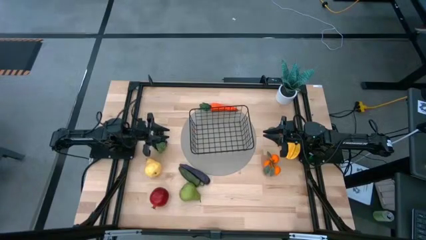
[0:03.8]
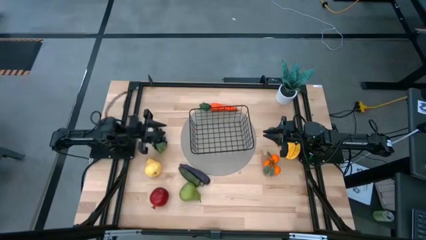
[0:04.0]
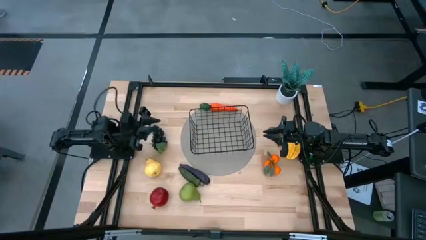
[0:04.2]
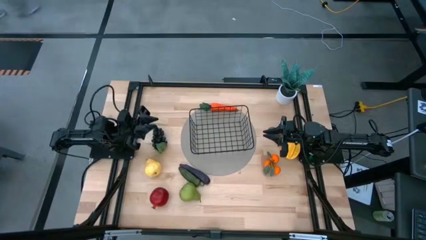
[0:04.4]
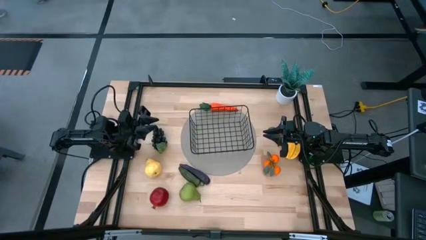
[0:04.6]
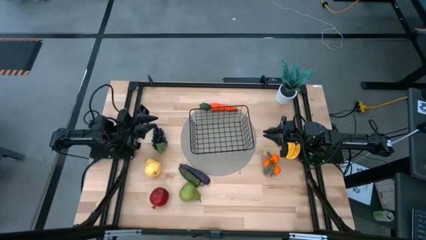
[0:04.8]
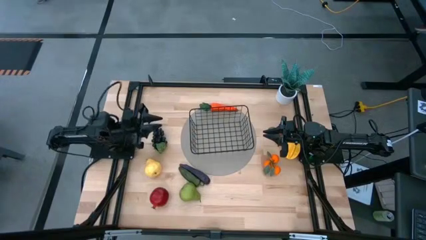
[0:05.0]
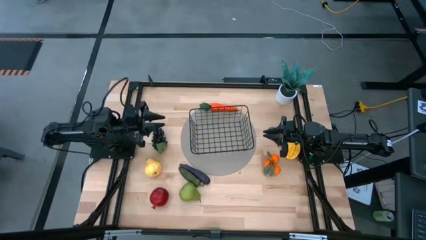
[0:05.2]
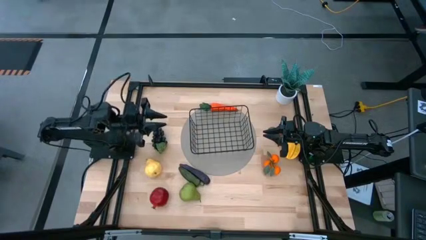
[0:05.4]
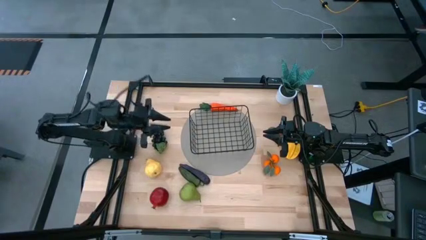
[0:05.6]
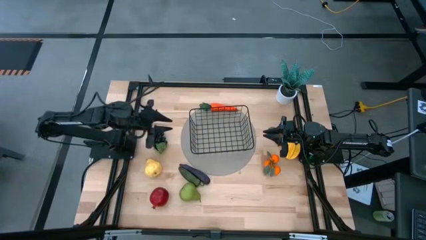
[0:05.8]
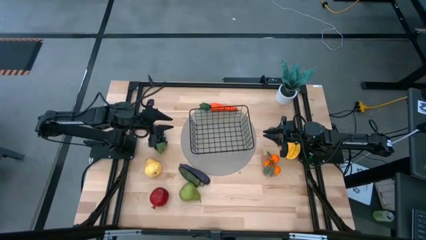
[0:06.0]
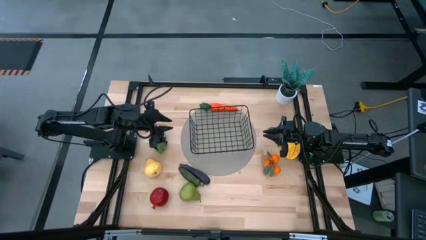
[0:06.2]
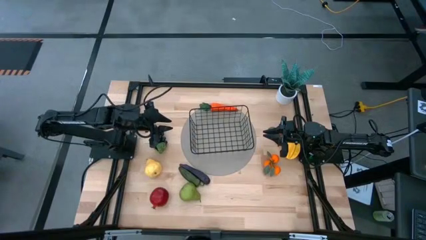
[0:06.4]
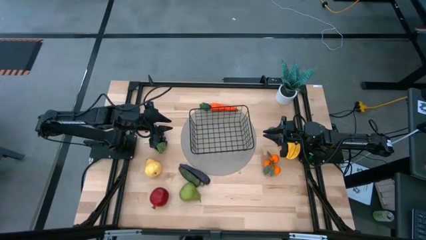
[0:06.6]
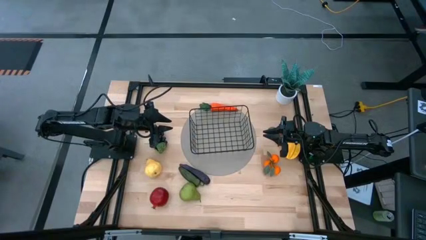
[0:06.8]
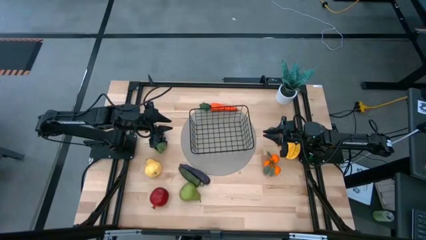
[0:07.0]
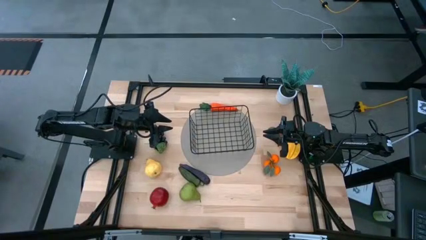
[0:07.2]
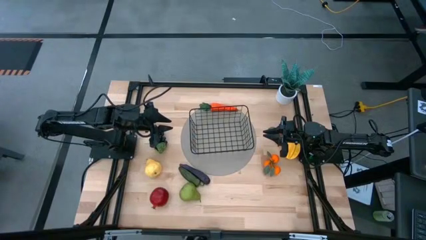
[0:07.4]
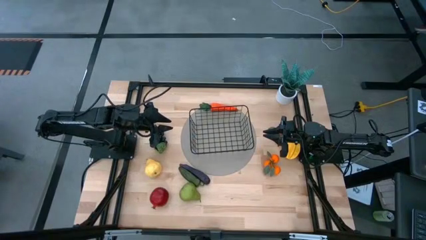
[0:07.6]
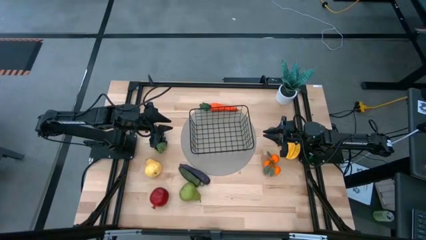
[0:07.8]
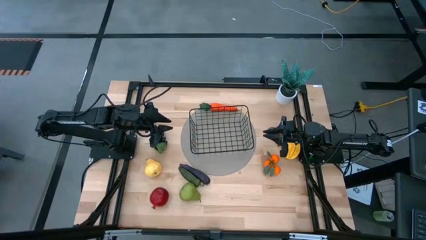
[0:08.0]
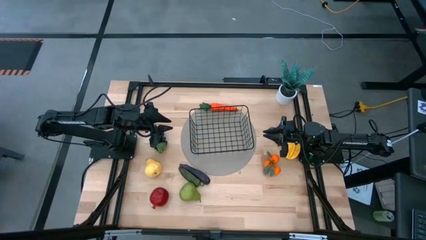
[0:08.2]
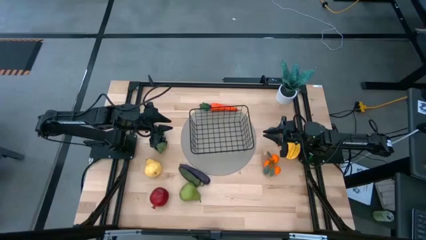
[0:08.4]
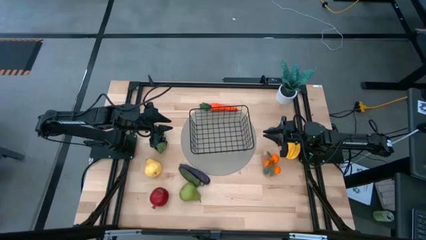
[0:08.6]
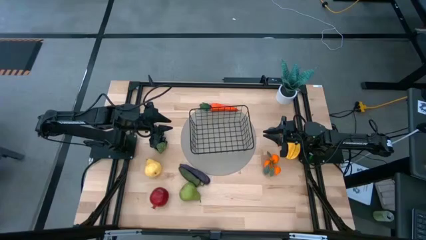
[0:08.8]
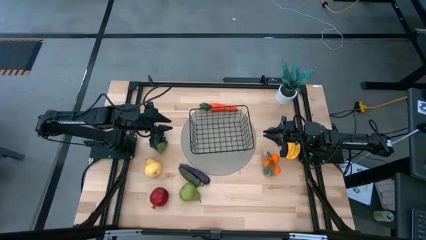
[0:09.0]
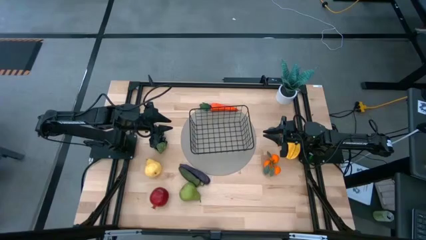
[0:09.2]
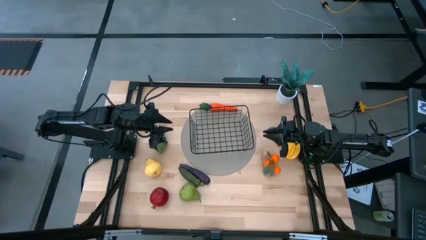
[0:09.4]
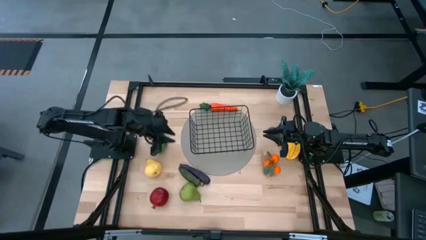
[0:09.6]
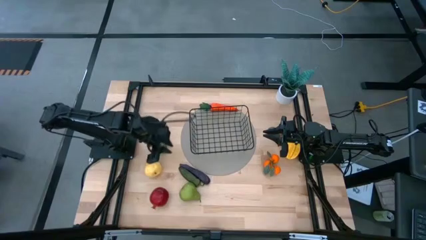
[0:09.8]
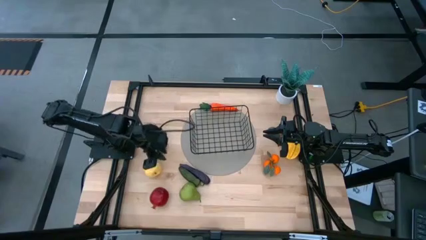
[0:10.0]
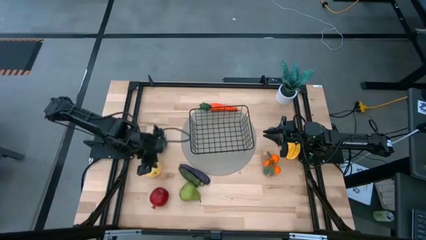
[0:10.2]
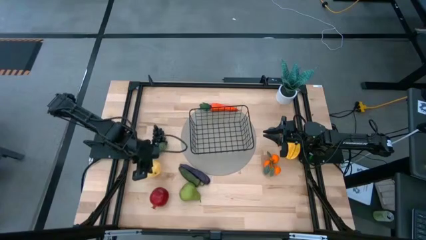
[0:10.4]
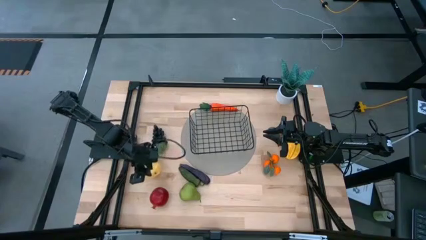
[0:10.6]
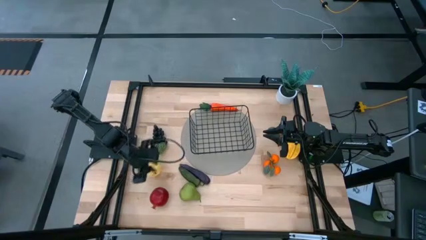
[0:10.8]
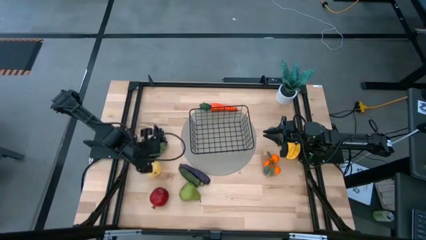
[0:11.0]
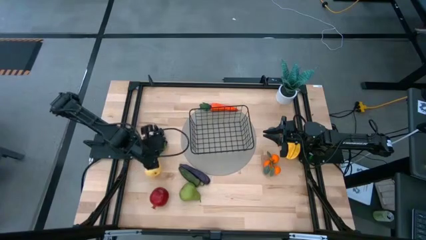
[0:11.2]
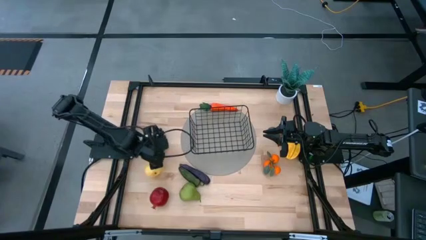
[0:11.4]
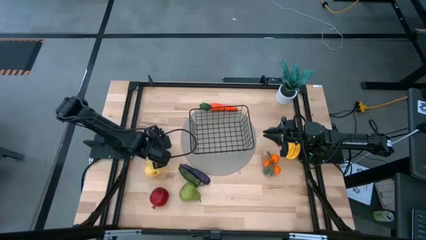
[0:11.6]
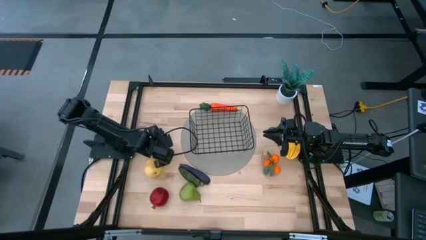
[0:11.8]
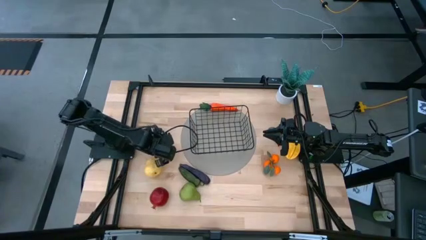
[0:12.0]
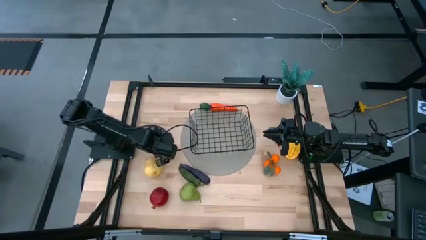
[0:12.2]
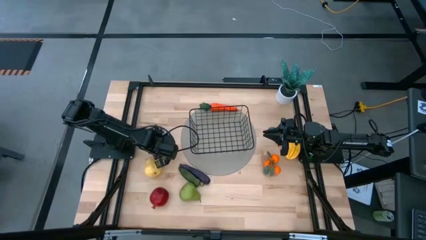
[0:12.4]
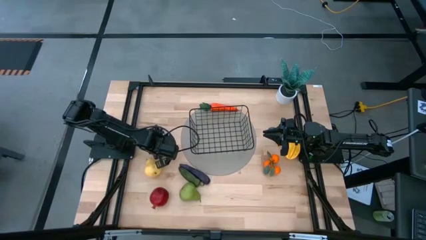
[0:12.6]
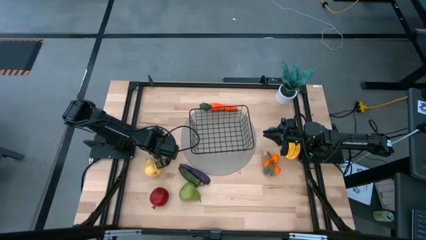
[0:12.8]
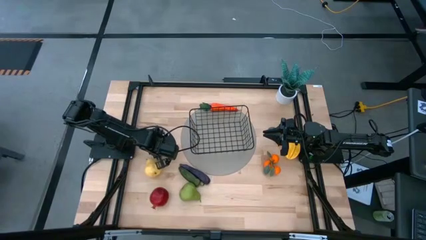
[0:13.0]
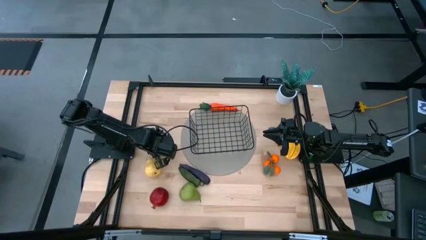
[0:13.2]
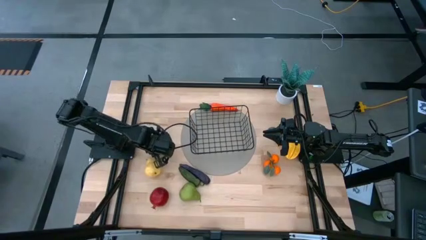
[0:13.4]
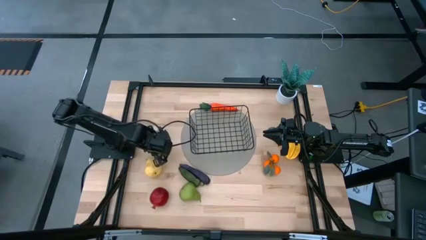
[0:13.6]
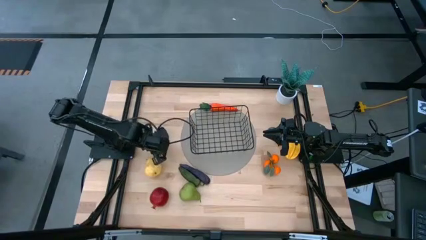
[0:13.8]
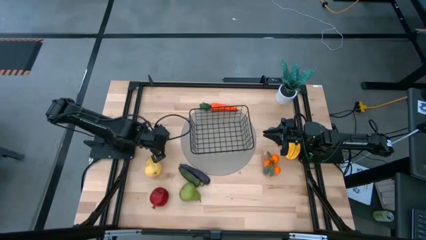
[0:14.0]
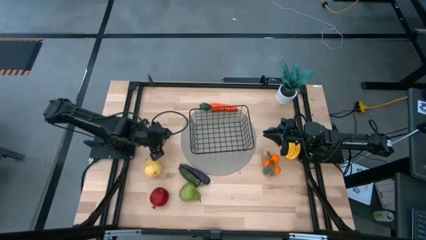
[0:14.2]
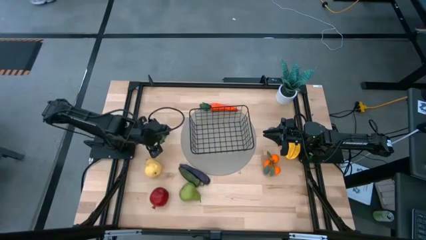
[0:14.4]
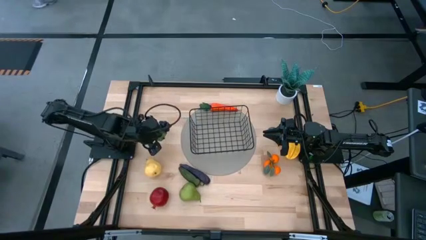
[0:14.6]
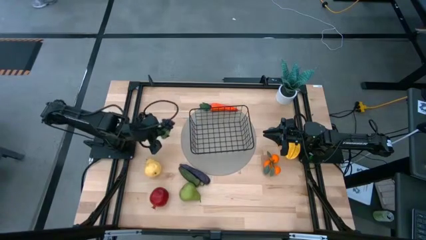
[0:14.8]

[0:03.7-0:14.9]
Task: Build produce basket
Put the grapes in the mesh basket

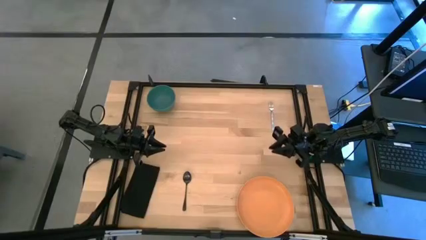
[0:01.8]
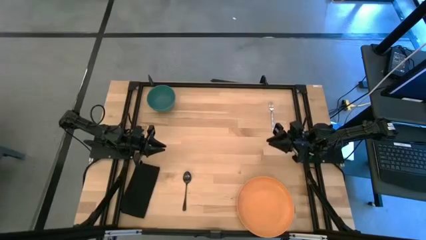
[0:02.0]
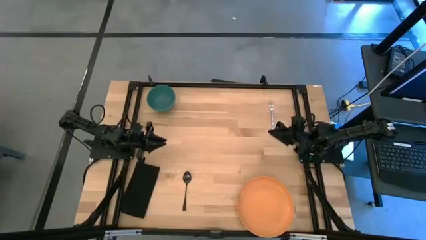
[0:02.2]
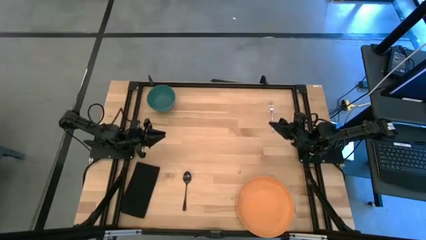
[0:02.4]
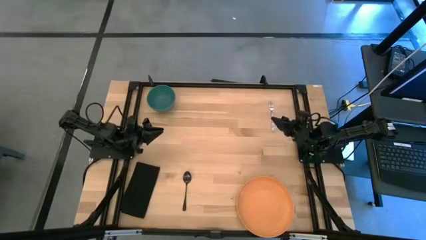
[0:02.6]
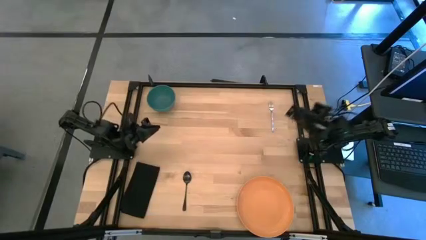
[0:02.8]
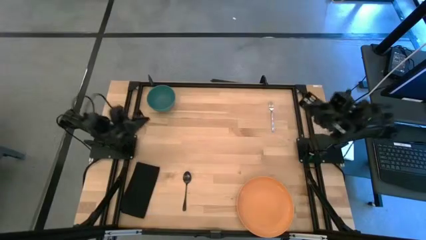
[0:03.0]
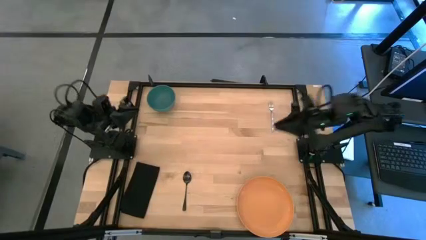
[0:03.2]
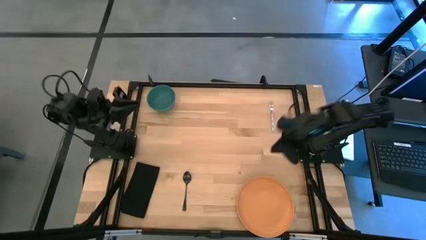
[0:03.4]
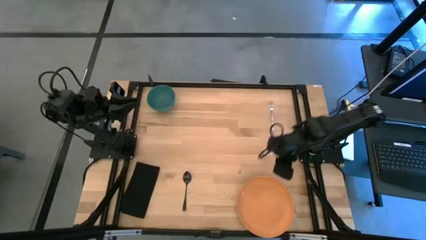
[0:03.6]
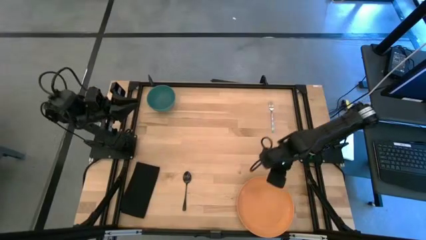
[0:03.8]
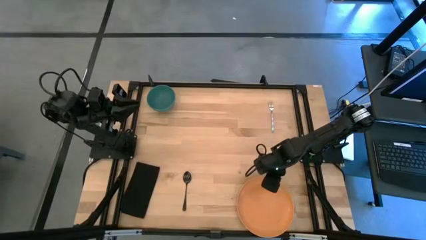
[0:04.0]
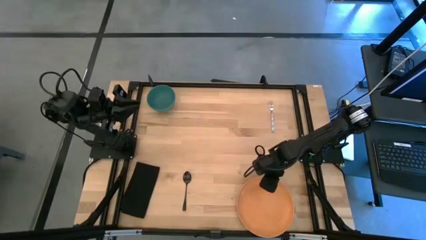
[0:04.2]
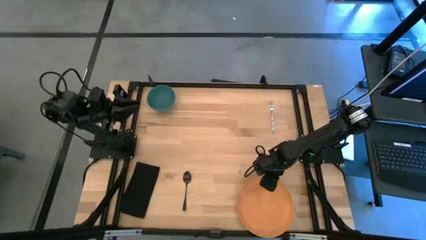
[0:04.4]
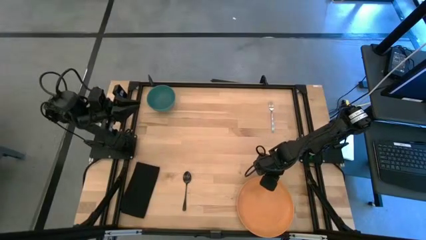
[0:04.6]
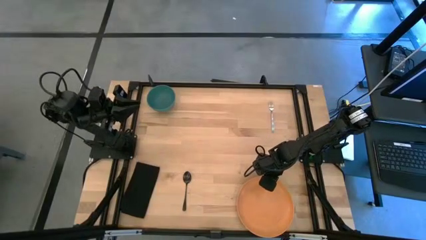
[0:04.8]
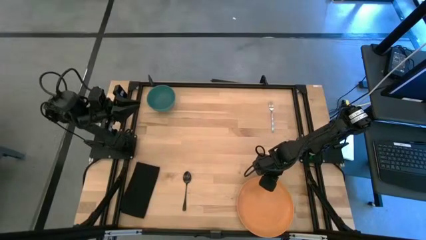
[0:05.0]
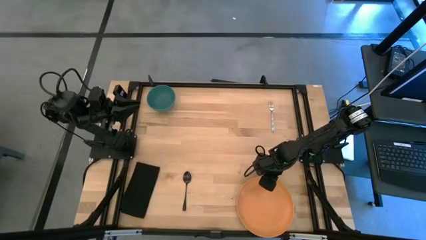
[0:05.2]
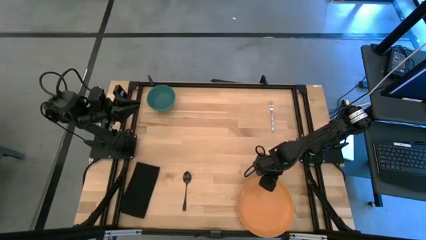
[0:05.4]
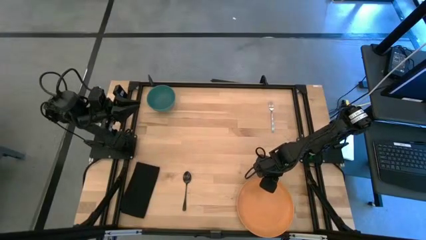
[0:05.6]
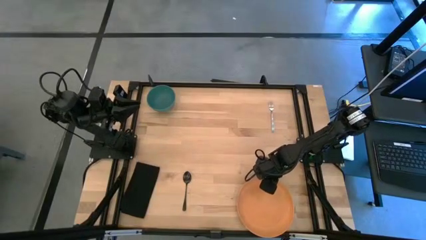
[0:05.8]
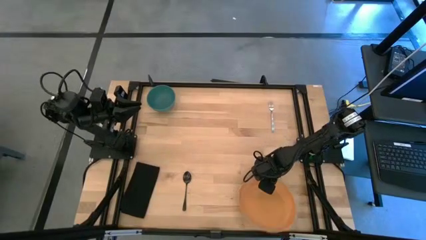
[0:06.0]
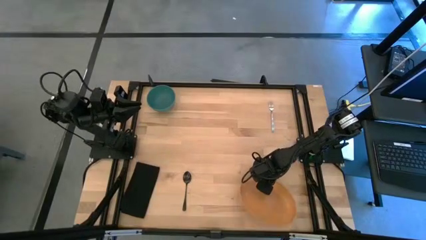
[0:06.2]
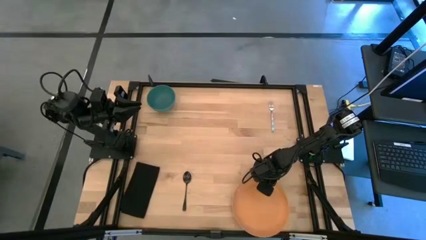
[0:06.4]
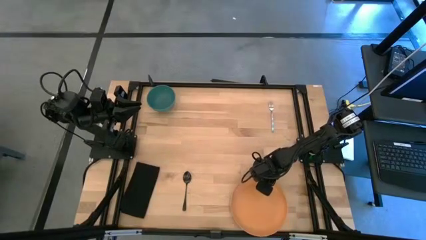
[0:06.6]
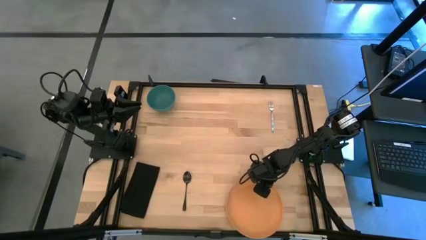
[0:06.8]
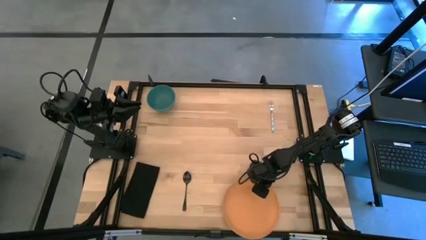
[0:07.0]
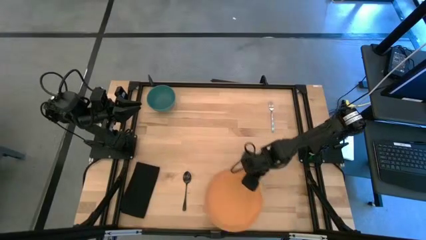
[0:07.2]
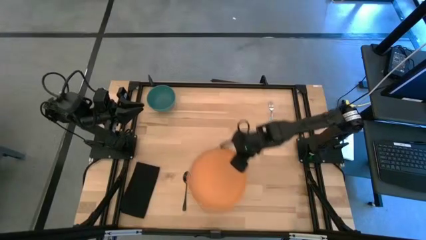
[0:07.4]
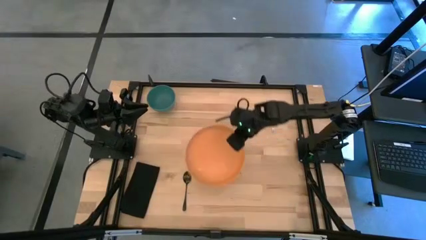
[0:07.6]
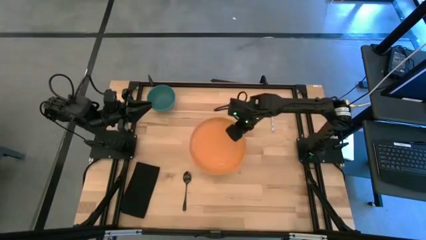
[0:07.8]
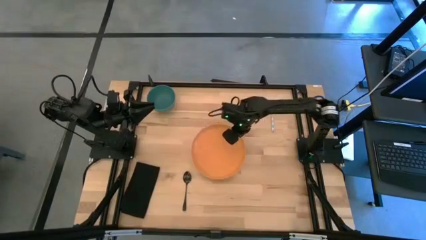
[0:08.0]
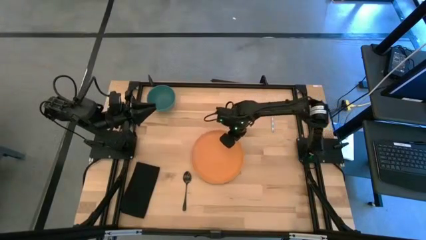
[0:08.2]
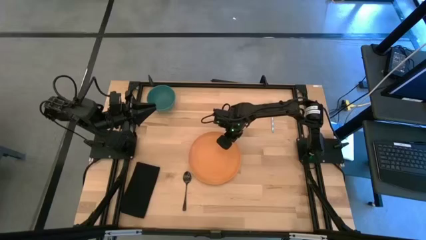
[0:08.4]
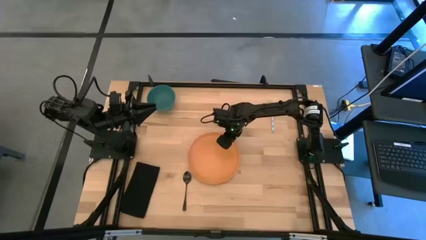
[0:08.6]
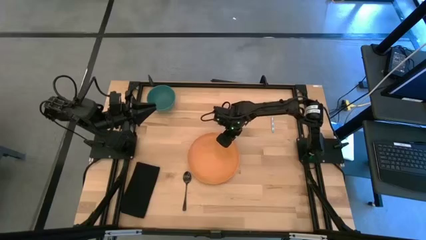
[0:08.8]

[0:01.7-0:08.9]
Task: Set table place
Move the orange plate to the center of the table
